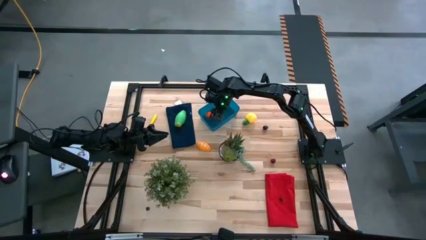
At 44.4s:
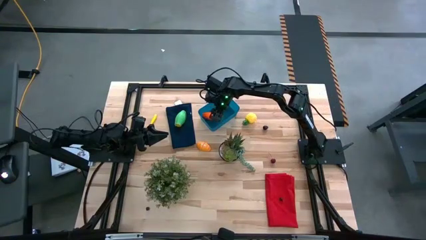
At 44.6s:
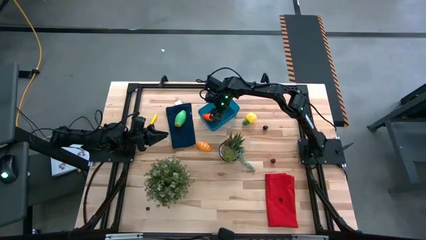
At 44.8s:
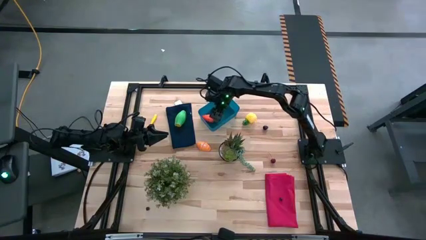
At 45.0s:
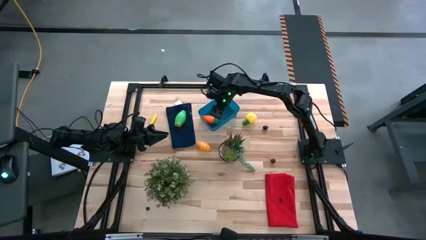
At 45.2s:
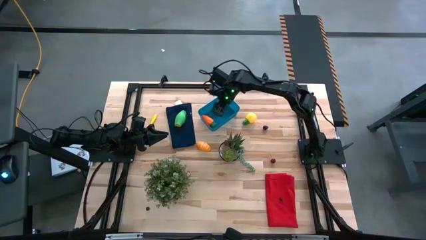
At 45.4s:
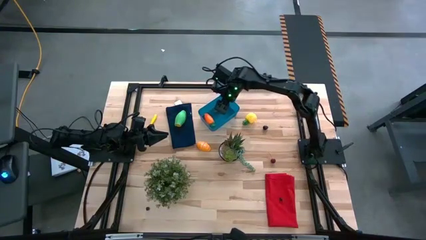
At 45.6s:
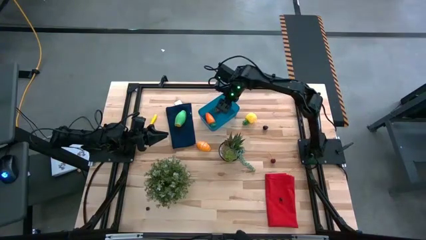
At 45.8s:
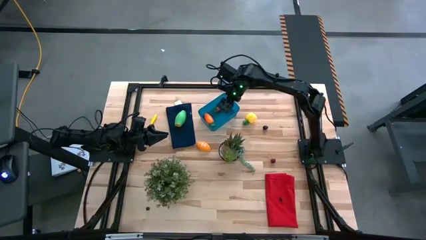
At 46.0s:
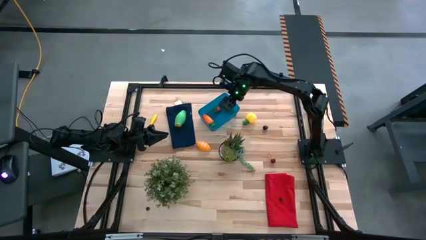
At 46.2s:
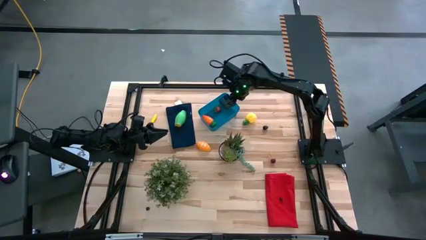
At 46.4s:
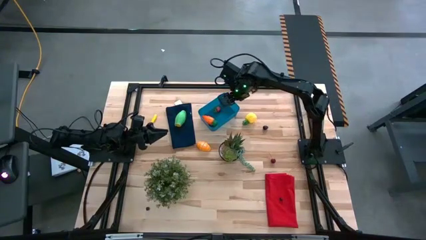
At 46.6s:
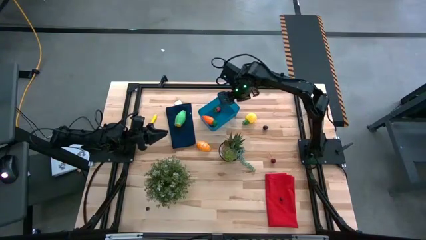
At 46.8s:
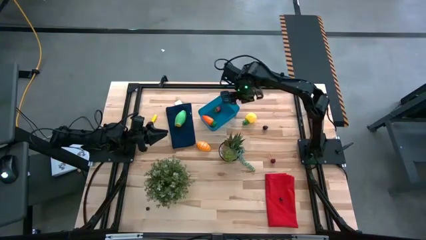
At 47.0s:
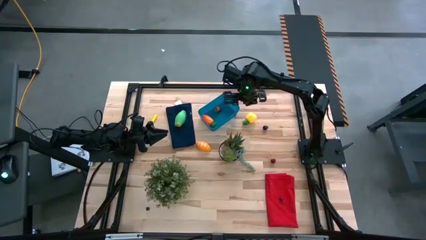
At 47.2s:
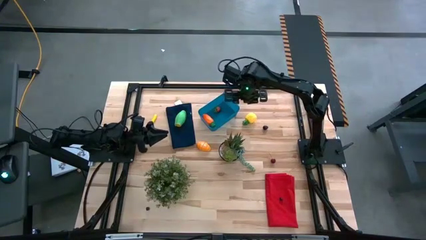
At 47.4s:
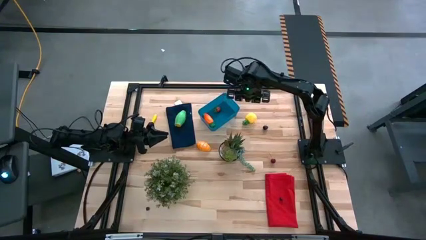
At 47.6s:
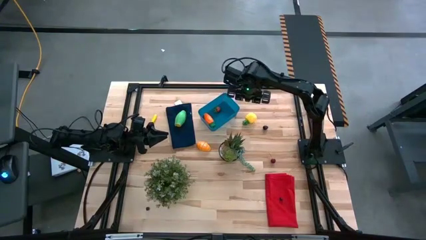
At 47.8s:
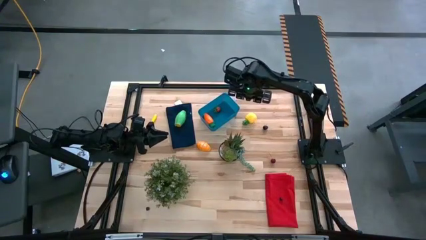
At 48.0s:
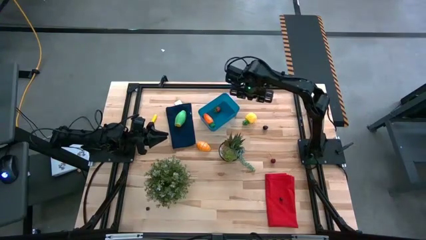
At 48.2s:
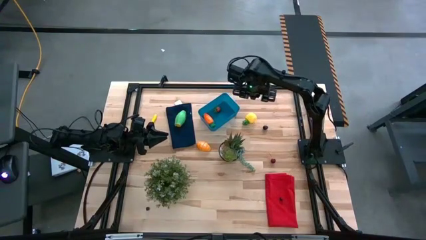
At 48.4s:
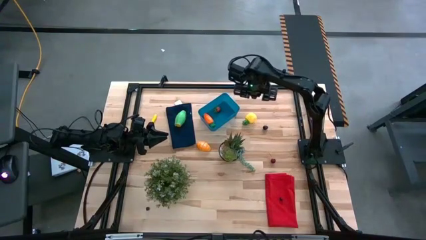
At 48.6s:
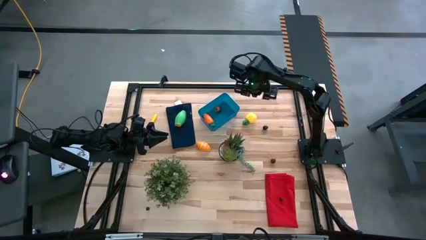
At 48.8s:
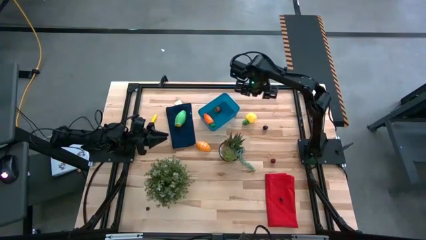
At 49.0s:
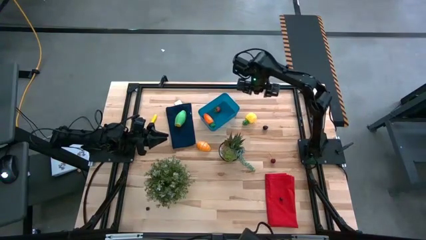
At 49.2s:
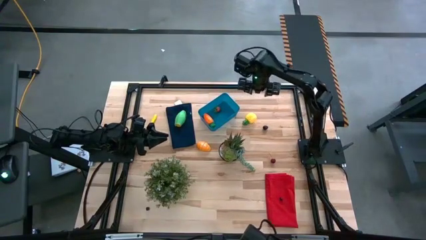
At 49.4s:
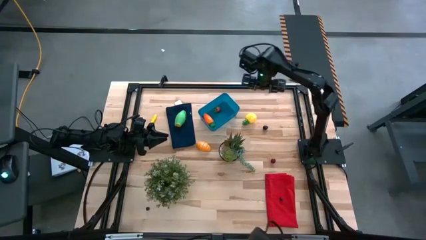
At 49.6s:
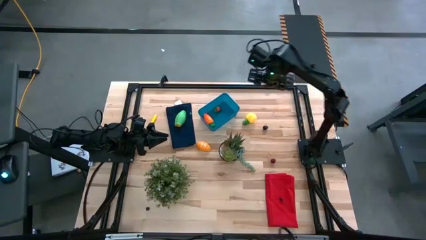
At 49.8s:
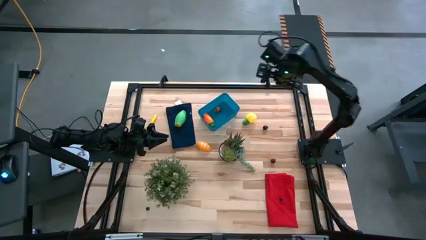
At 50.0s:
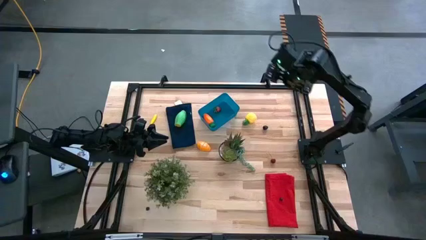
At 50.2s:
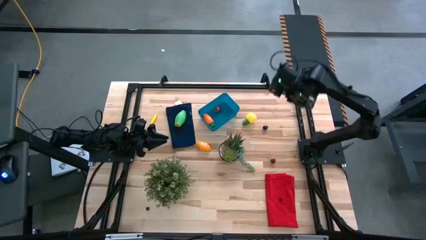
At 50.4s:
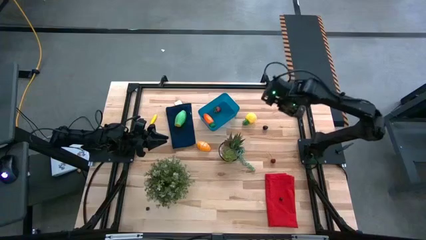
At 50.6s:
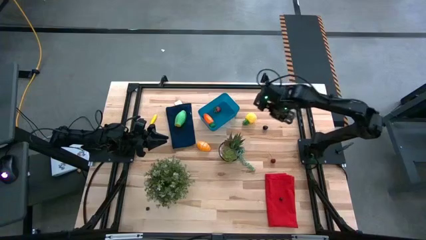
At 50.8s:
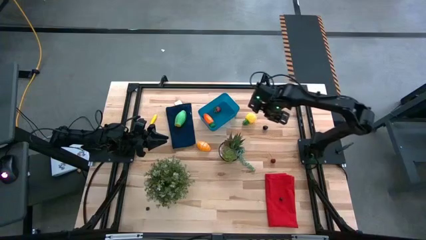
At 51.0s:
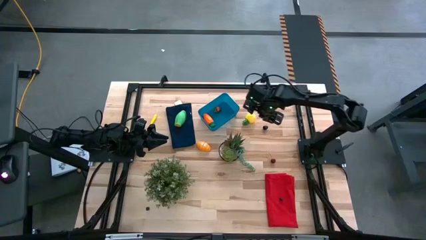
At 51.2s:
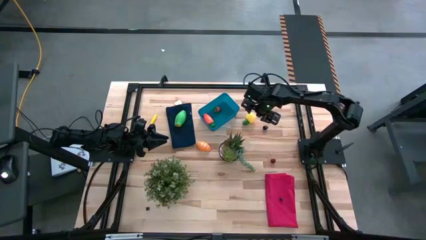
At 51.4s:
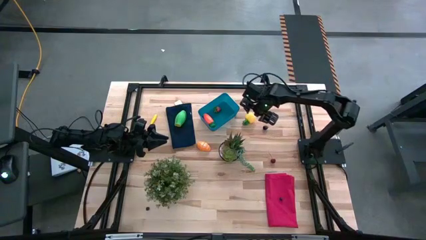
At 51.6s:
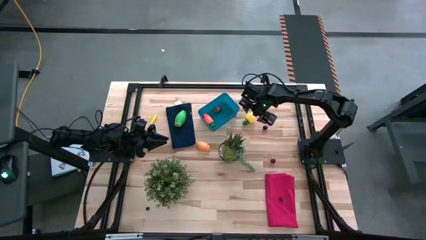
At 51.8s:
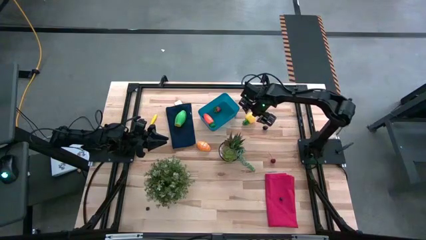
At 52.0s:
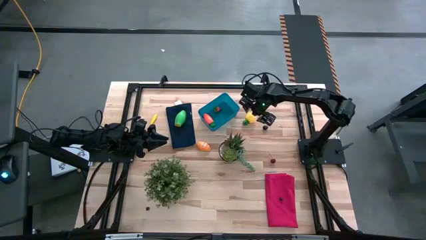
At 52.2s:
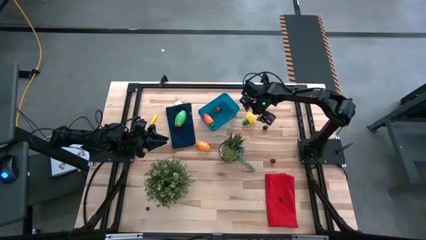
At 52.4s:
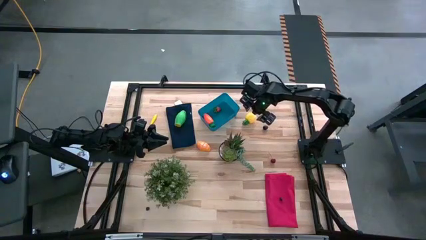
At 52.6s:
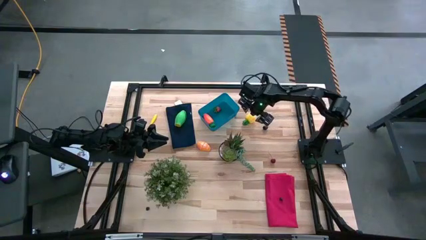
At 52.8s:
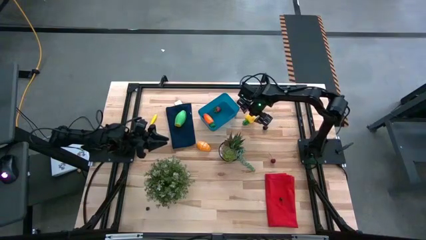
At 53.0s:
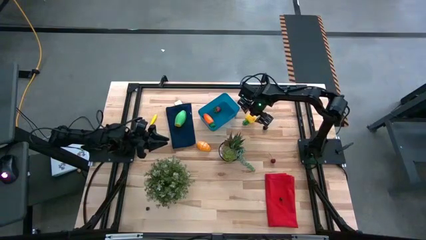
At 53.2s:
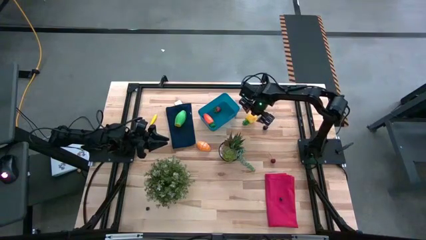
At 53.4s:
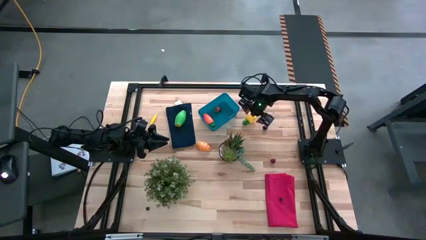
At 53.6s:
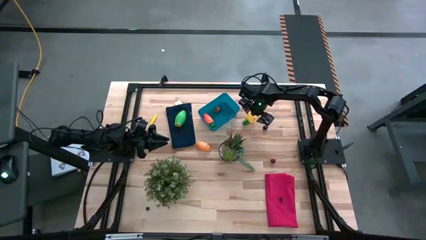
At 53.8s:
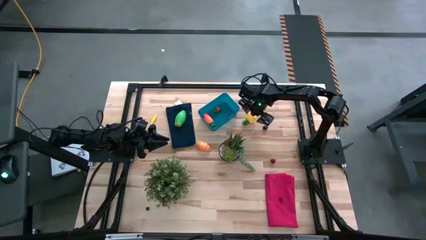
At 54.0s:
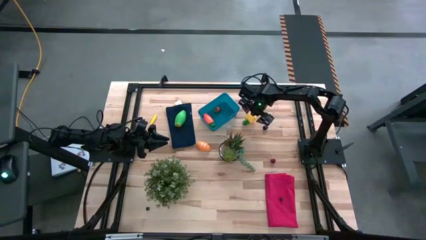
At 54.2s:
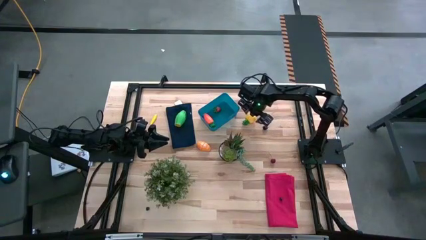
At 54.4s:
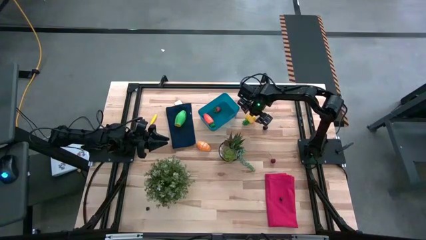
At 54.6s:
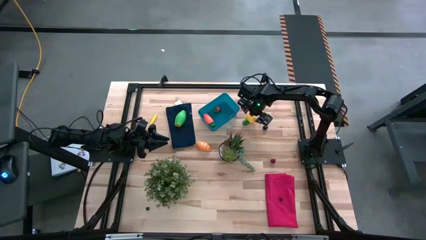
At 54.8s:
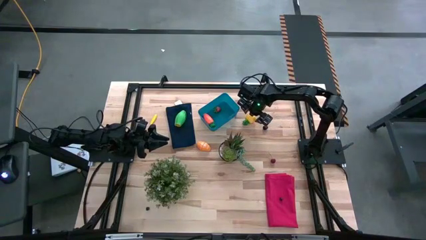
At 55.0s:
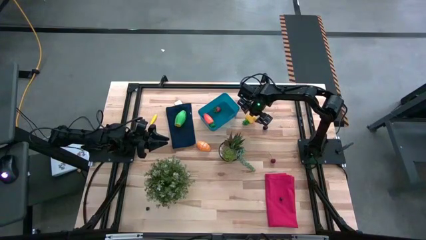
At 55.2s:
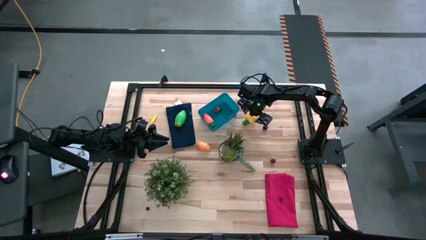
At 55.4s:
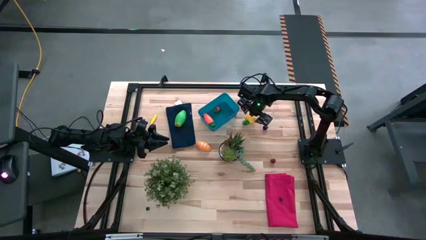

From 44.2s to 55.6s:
Task: Pick and placing Produce into tupperware
Put the yellow pineapple into the blue bin

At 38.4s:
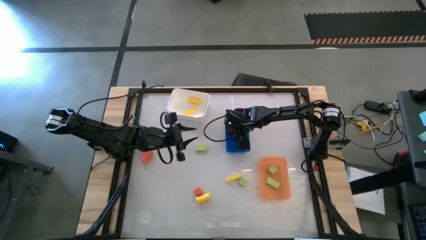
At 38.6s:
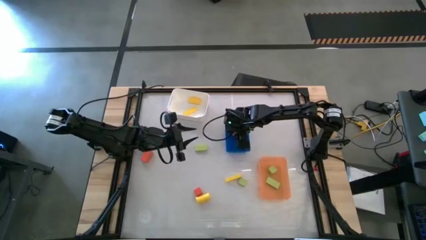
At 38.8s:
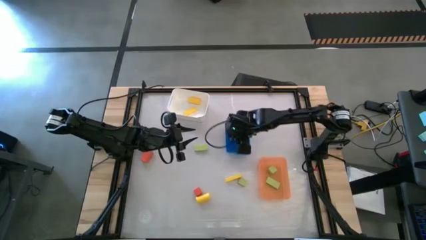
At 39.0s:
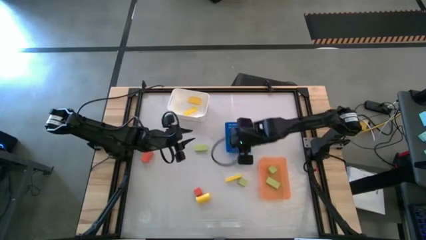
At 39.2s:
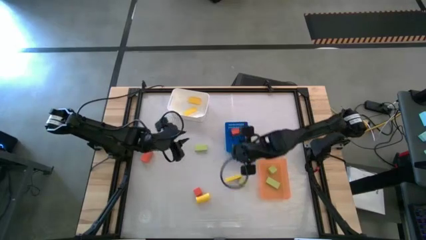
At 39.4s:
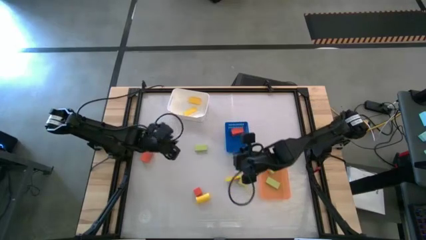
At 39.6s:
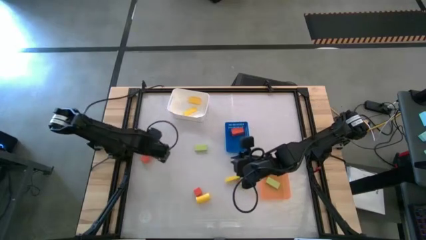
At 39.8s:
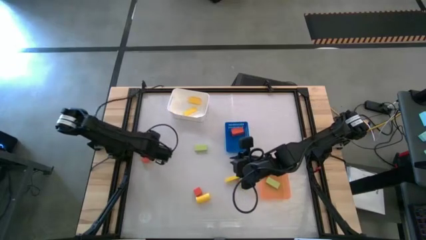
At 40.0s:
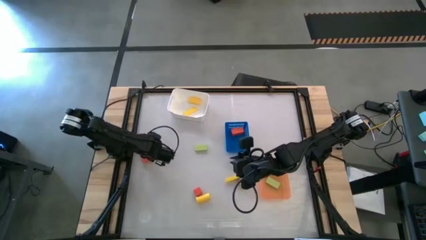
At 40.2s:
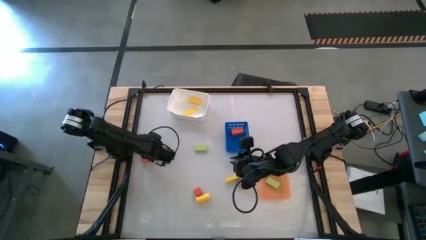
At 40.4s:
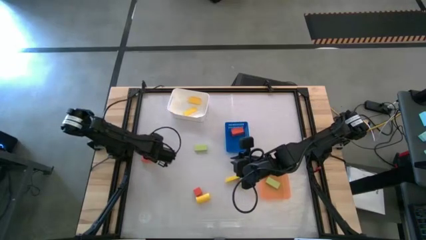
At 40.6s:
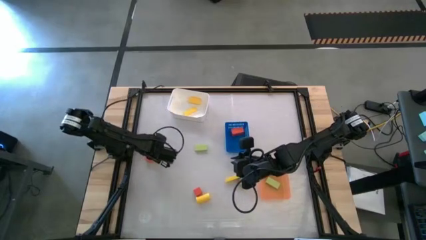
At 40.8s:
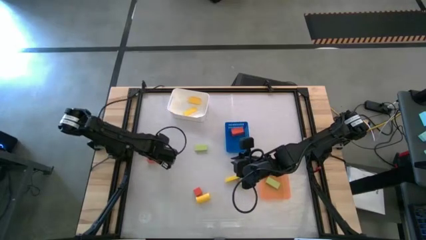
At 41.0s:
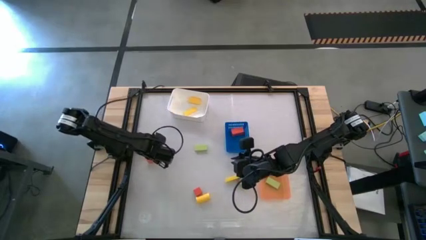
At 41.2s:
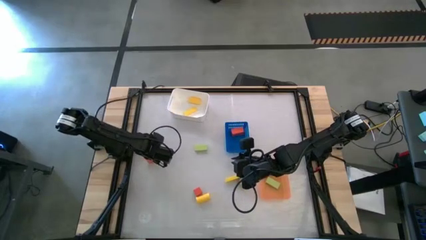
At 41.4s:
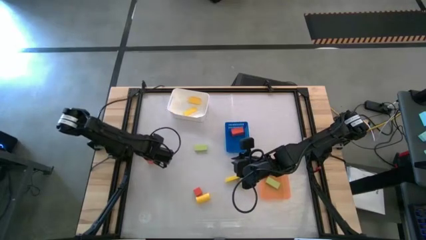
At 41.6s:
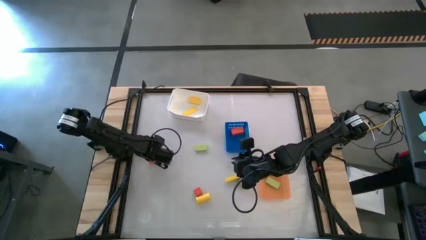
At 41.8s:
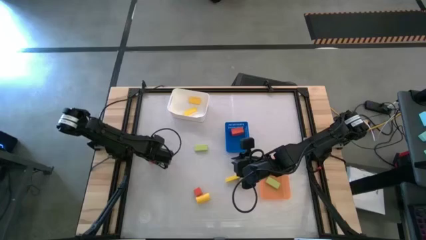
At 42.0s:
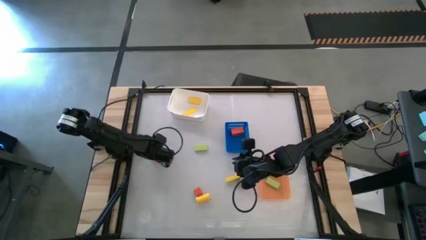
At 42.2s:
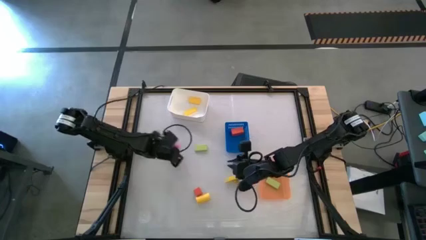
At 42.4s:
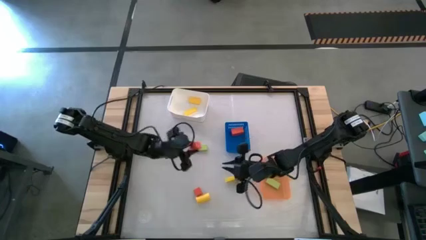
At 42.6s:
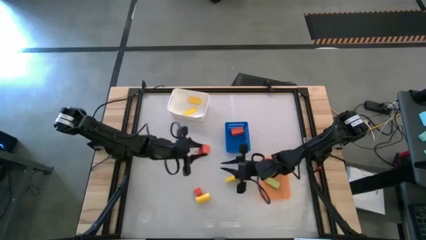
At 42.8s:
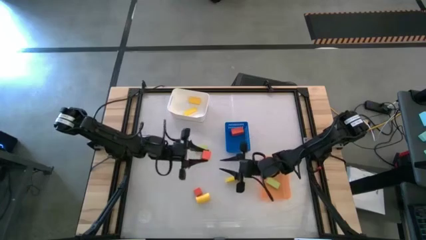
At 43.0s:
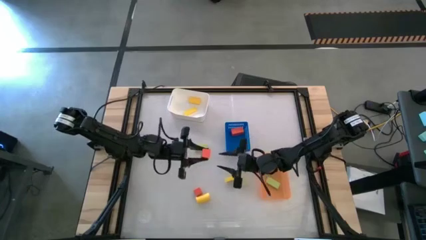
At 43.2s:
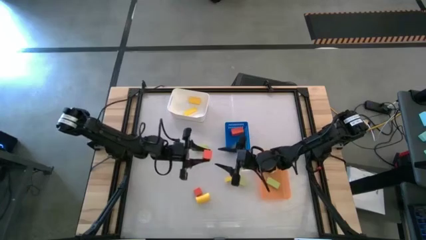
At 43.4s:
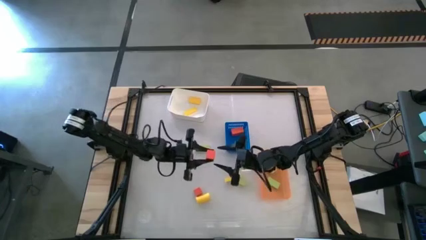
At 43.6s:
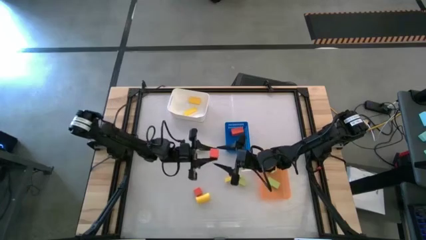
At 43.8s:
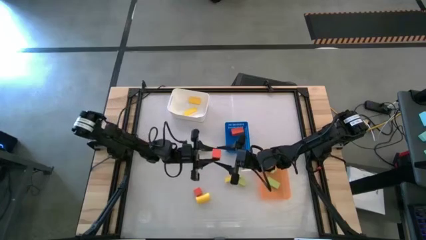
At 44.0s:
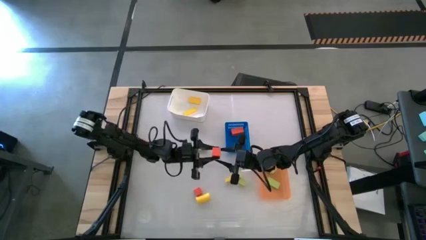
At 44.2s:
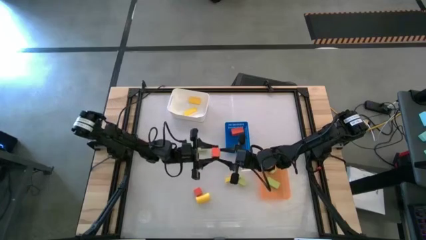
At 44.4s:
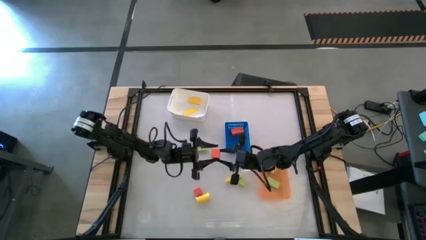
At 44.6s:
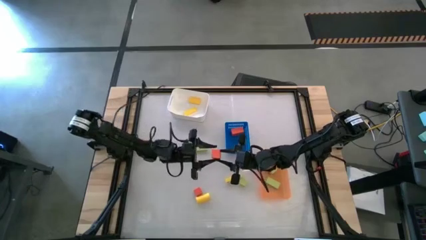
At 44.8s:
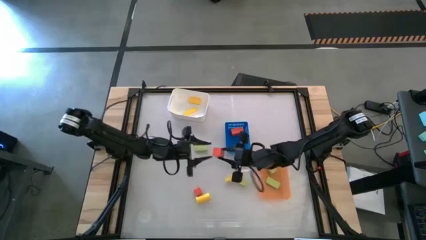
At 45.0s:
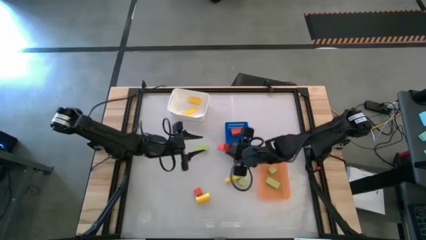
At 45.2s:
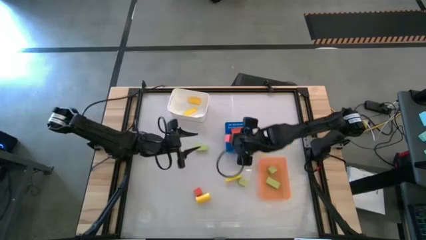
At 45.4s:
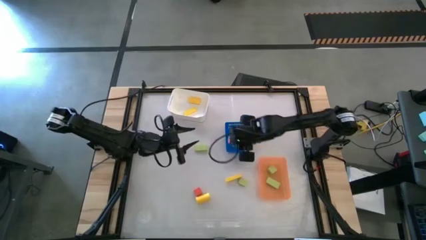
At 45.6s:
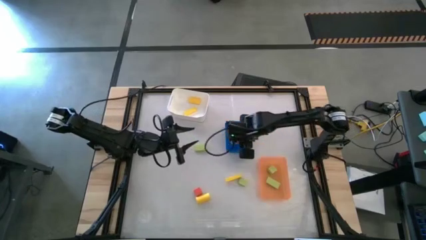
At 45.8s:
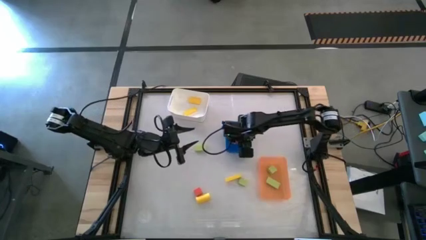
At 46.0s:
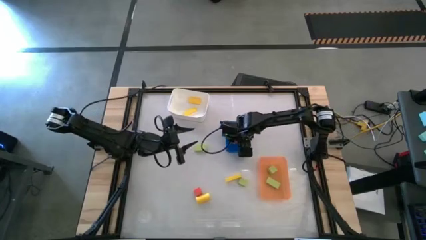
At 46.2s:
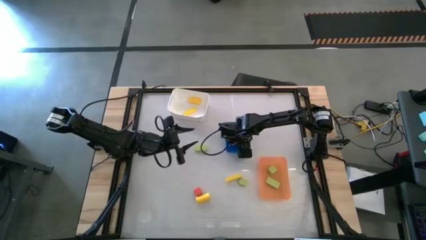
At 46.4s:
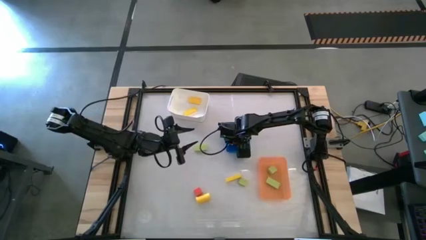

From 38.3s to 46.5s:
Task: Sort & place blocks by color
Put the orange block into the blue bin
